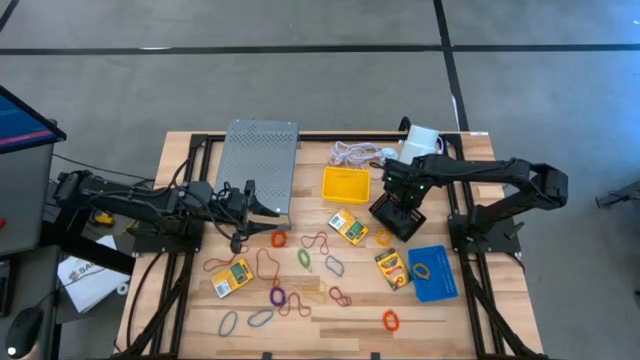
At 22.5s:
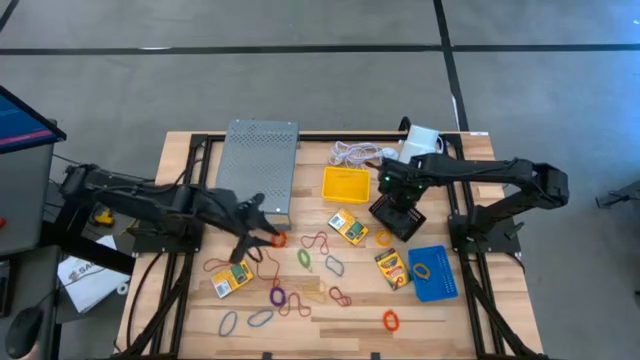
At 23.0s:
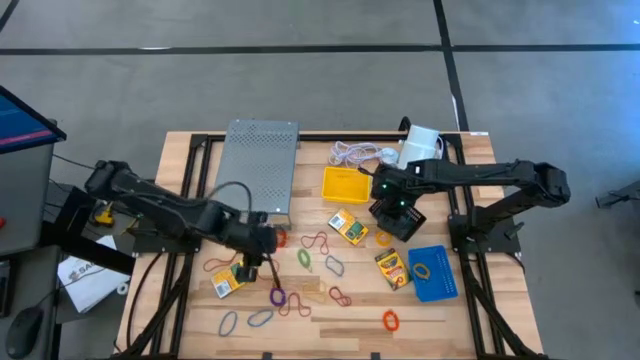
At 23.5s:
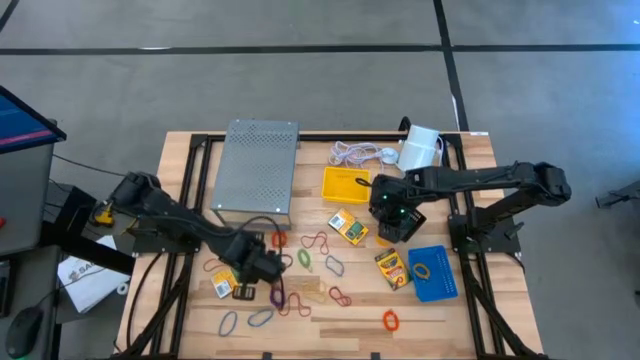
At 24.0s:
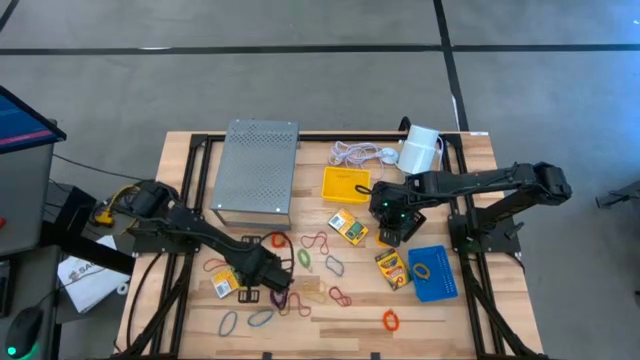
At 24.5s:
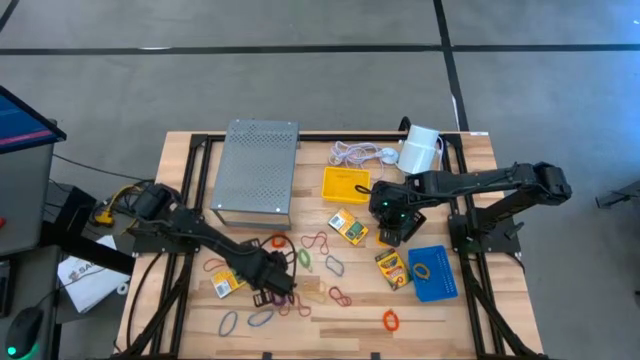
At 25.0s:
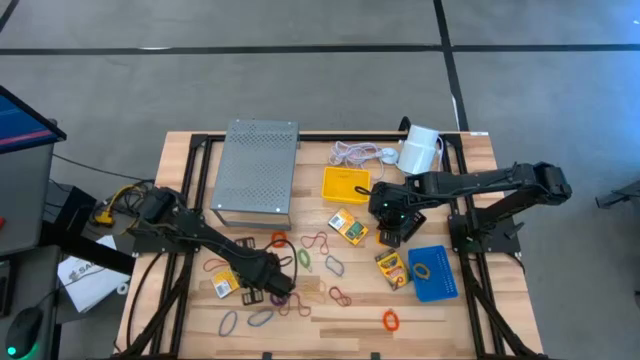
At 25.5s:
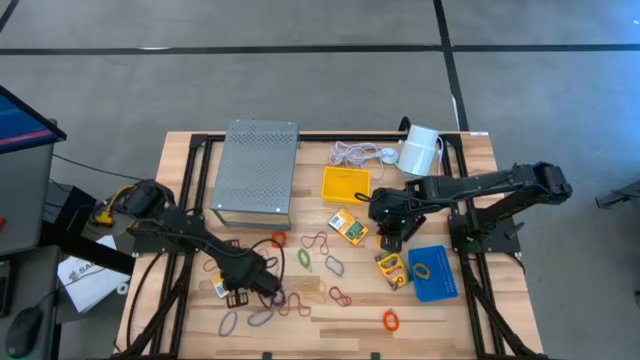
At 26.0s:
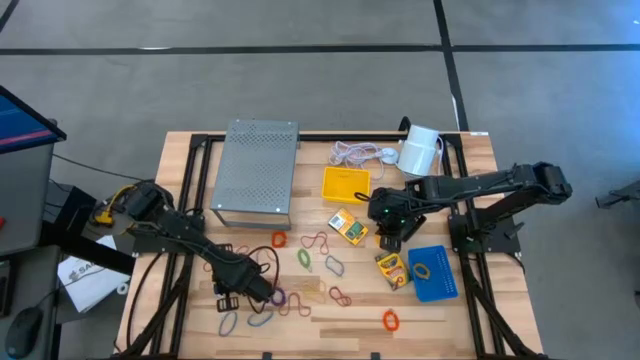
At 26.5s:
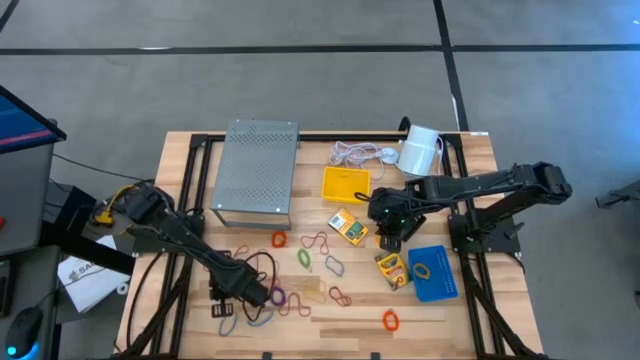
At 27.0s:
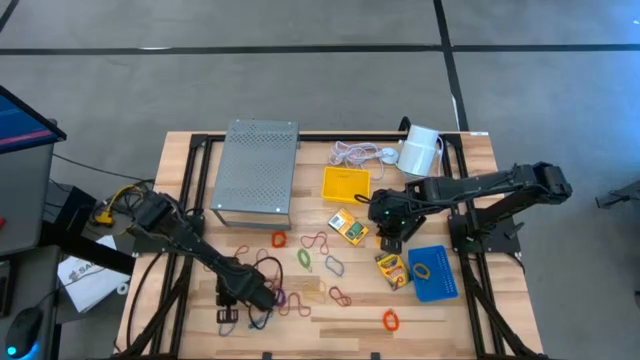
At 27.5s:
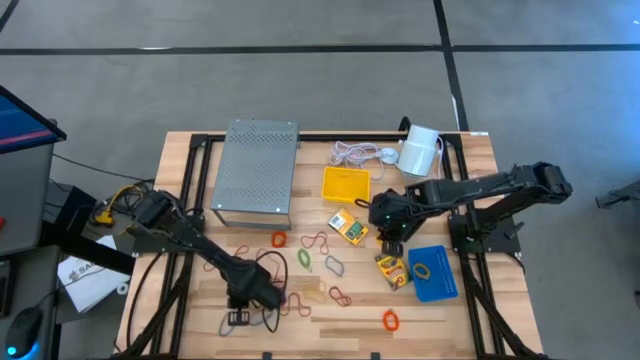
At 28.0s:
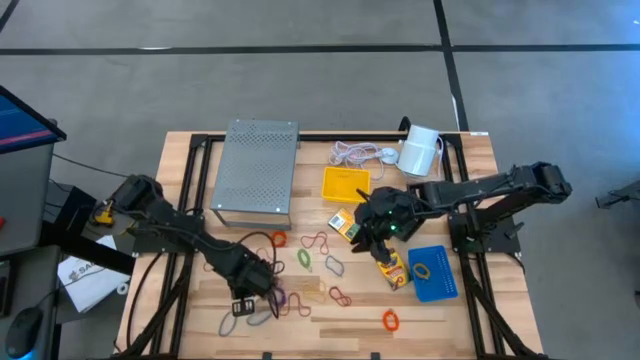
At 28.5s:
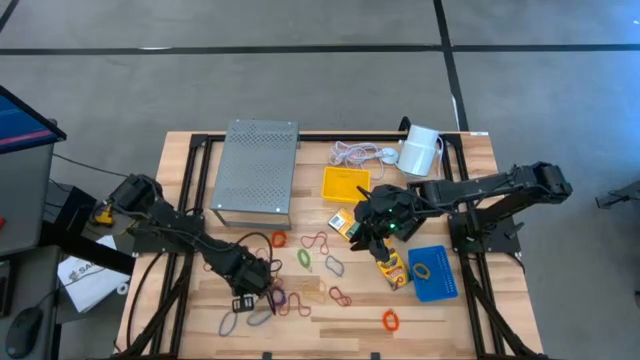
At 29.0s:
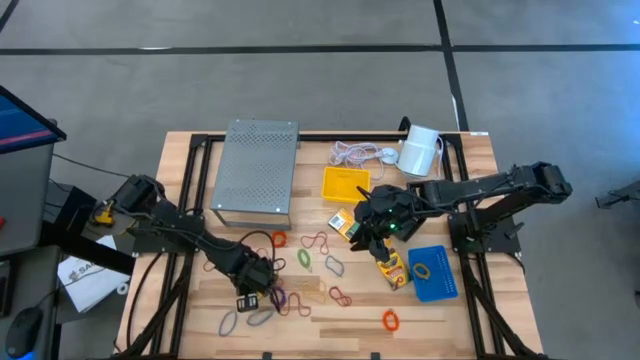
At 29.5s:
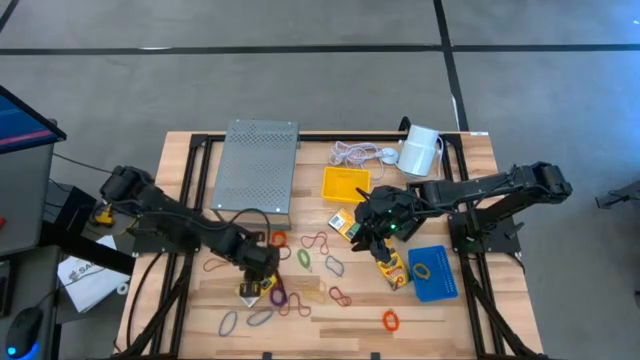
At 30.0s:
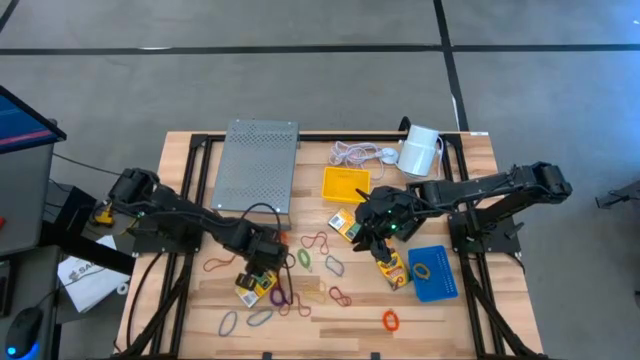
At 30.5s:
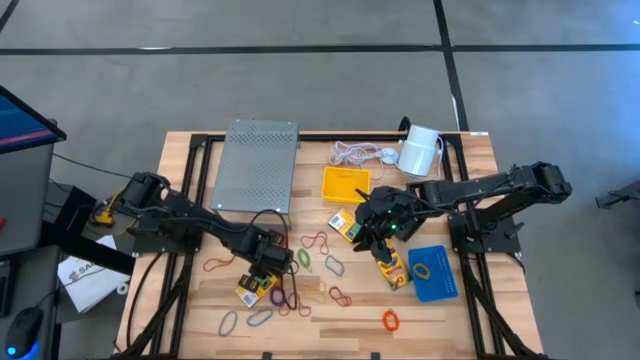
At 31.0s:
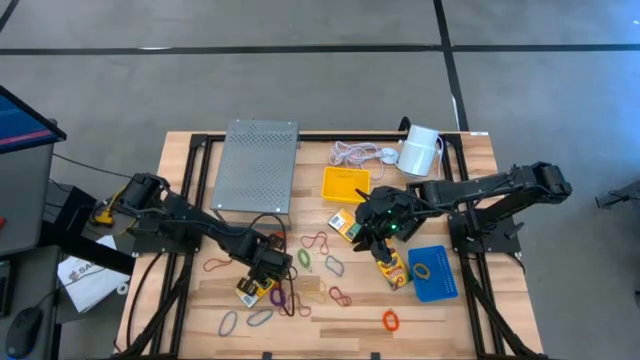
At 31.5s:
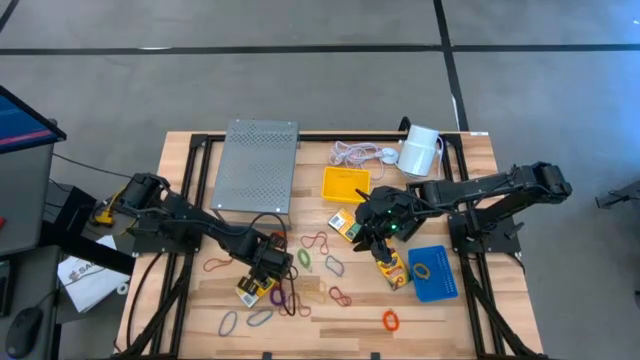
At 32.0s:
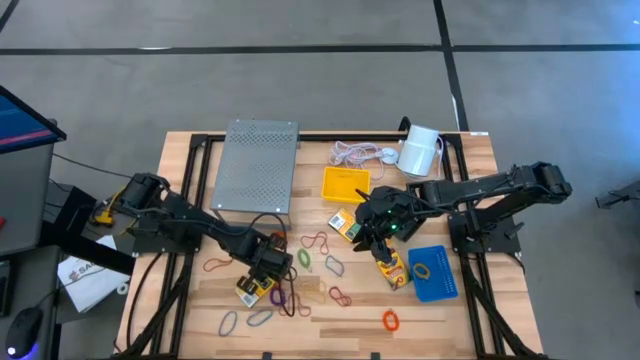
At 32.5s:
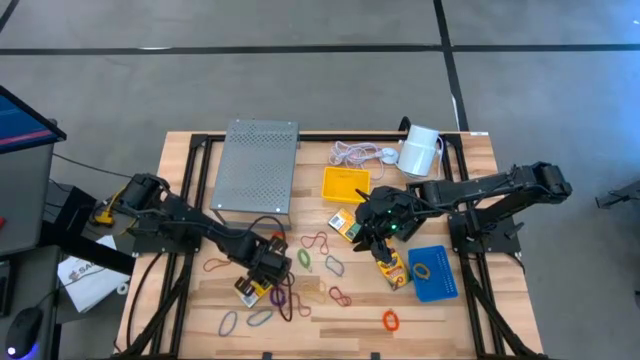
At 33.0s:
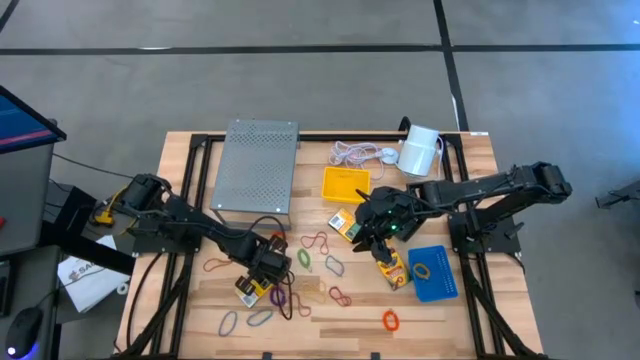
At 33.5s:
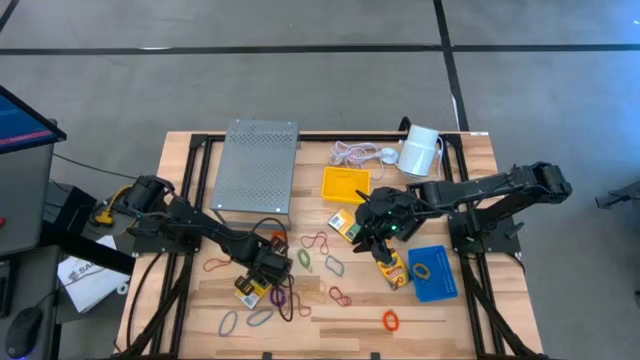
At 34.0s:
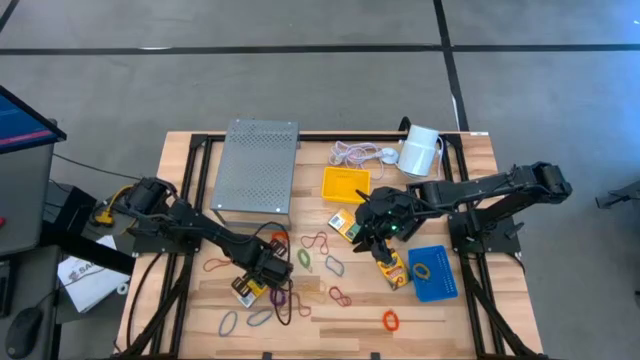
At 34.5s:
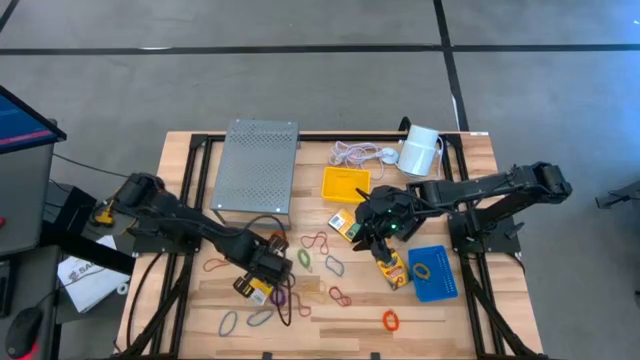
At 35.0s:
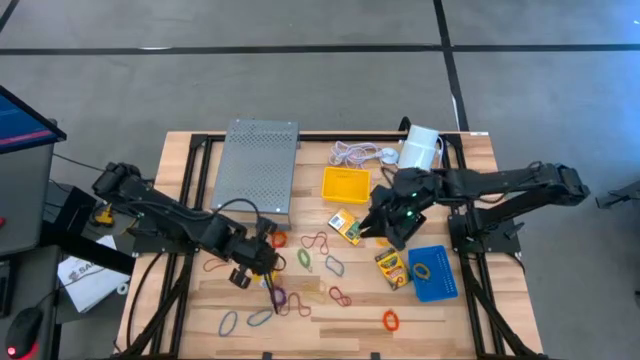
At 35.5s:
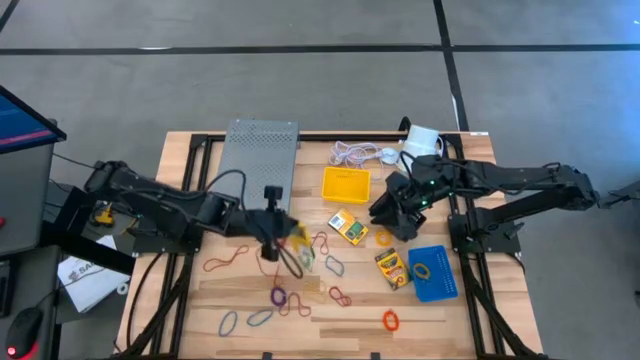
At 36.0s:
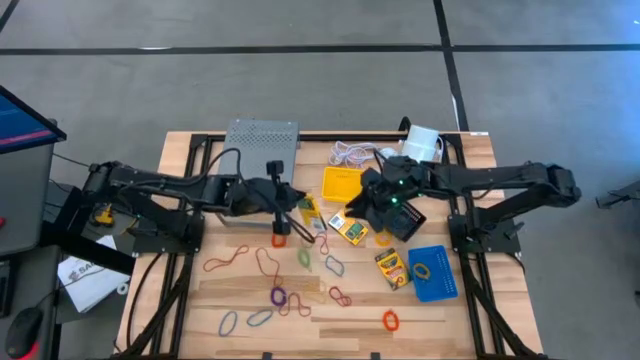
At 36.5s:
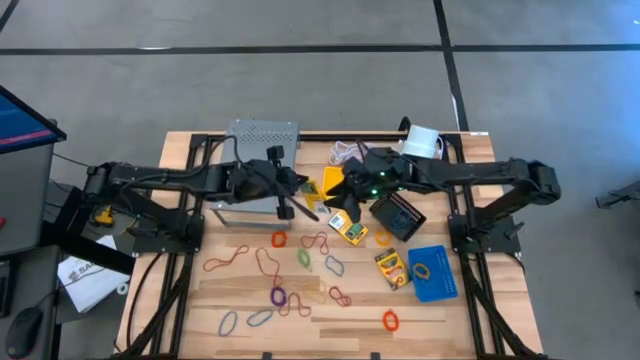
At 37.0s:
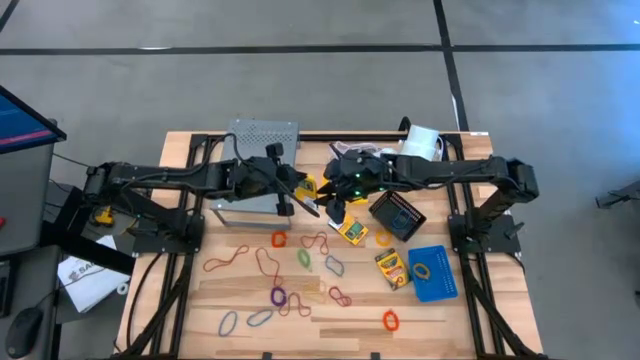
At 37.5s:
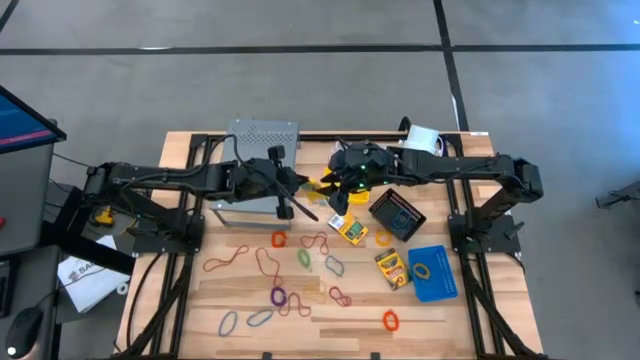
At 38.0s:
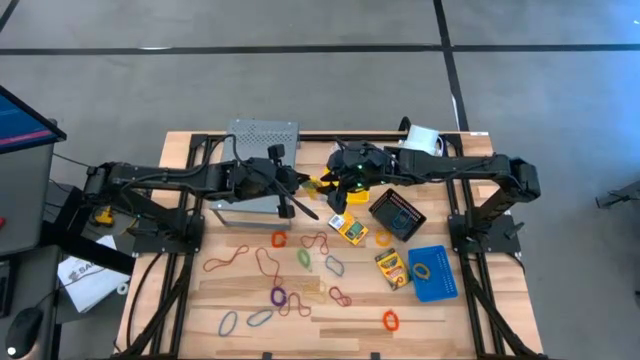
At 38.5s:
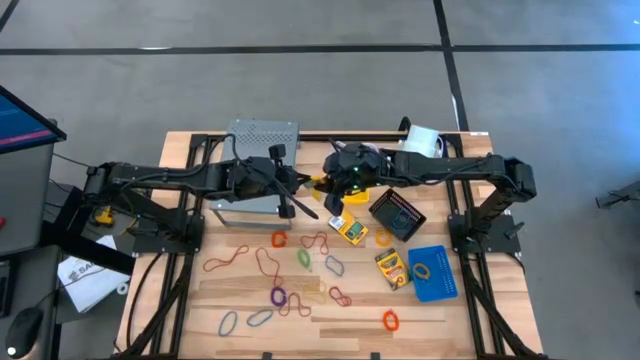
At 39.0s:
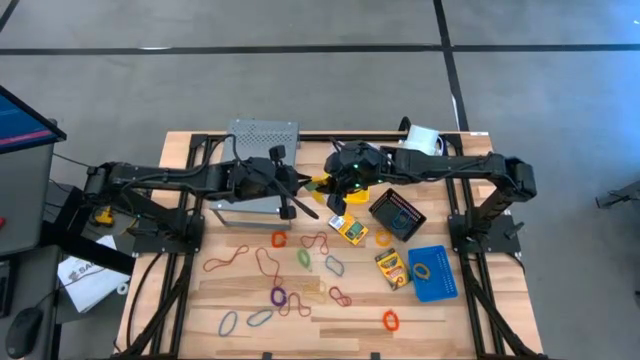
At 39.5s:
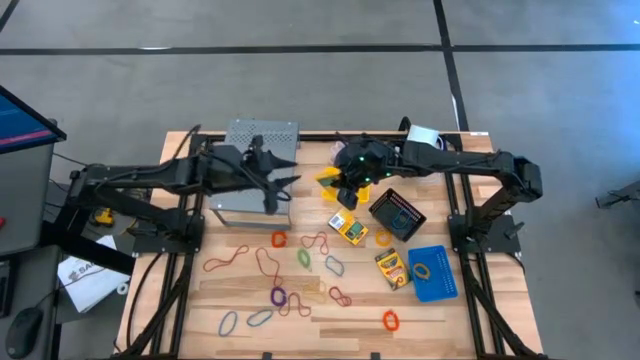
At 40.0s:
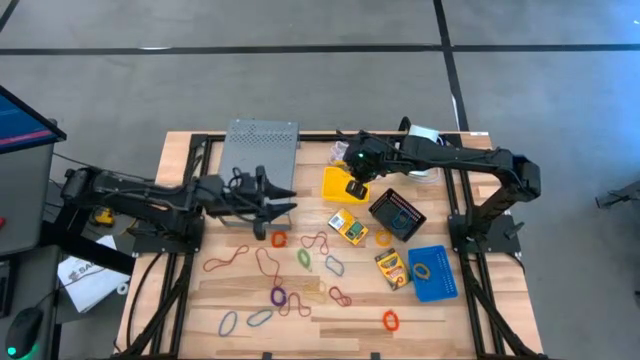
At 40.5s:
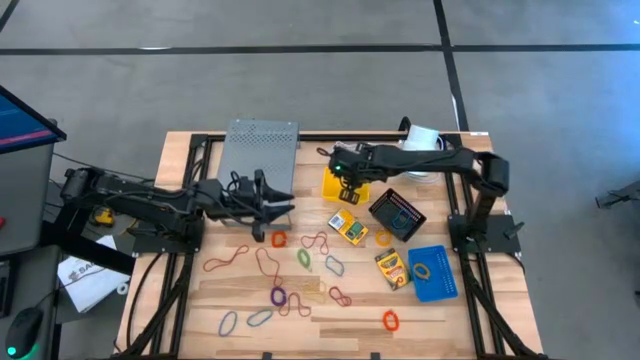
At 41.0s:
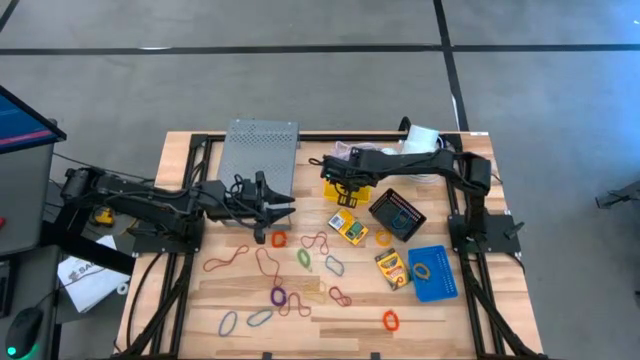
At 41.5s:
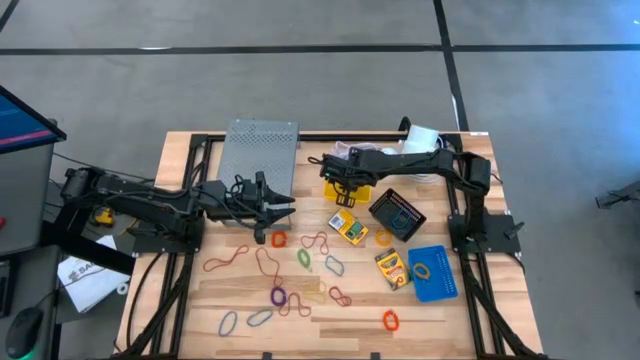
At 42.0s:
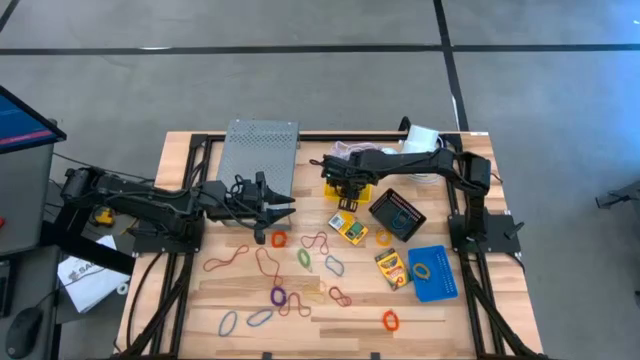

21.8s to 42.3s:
Task: Pick & Place Office Desk Supplies
Put the crayon box into the yellow bin
